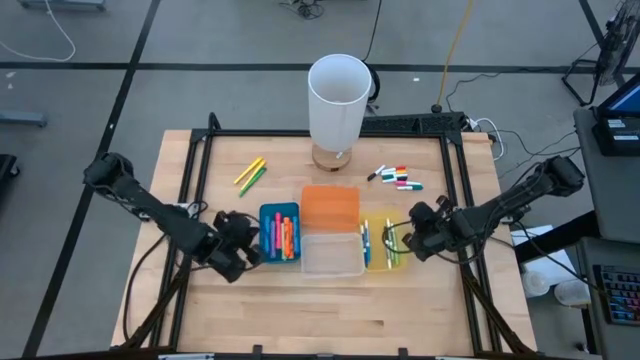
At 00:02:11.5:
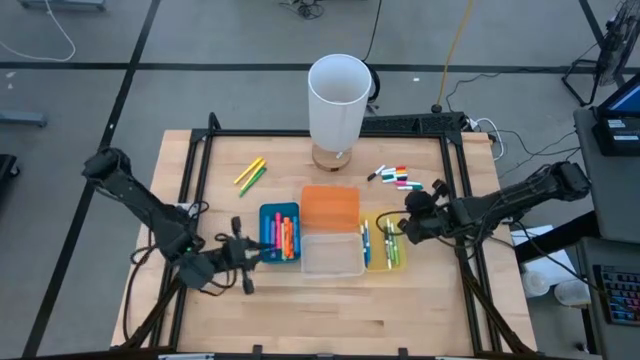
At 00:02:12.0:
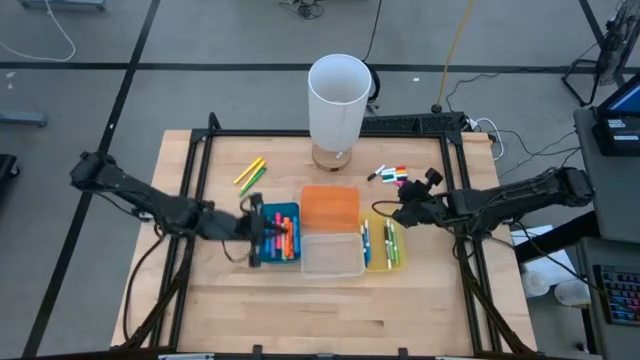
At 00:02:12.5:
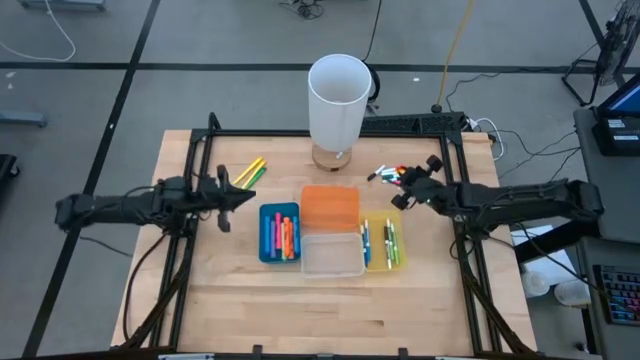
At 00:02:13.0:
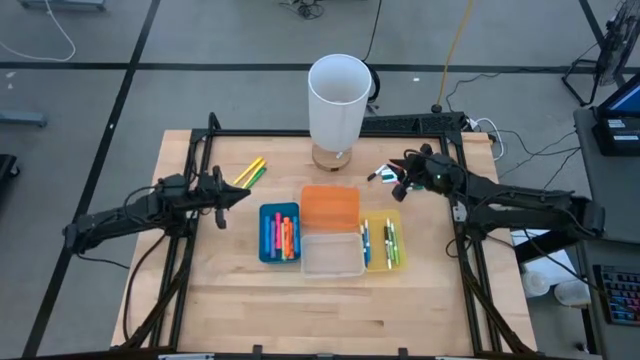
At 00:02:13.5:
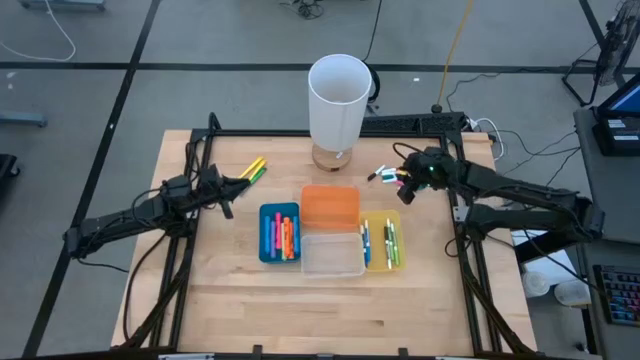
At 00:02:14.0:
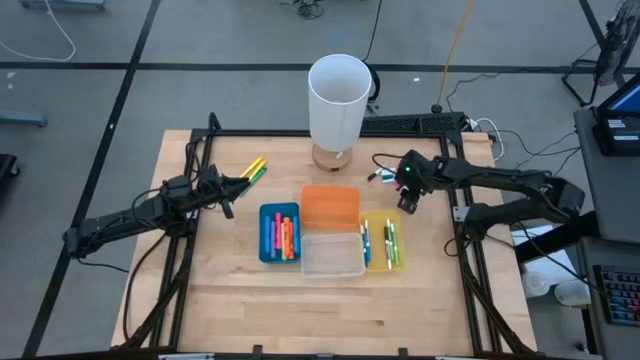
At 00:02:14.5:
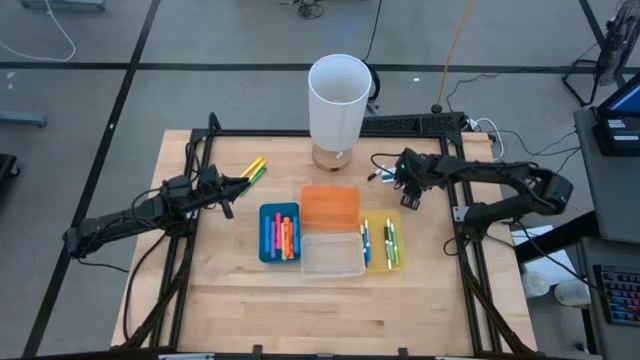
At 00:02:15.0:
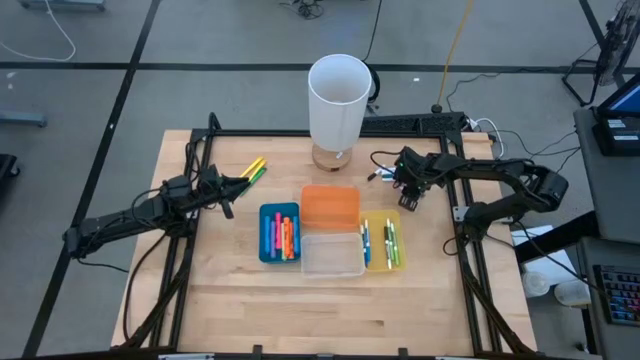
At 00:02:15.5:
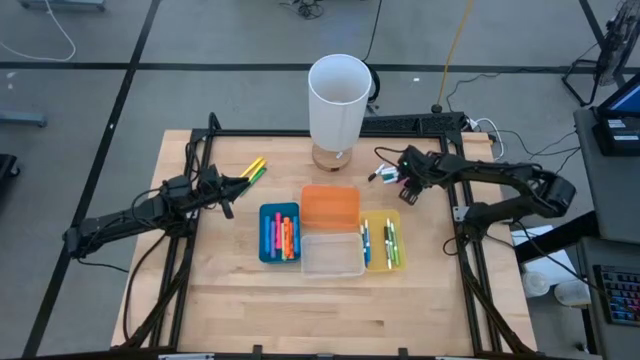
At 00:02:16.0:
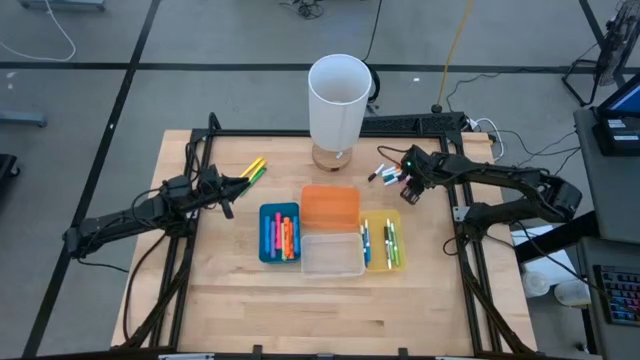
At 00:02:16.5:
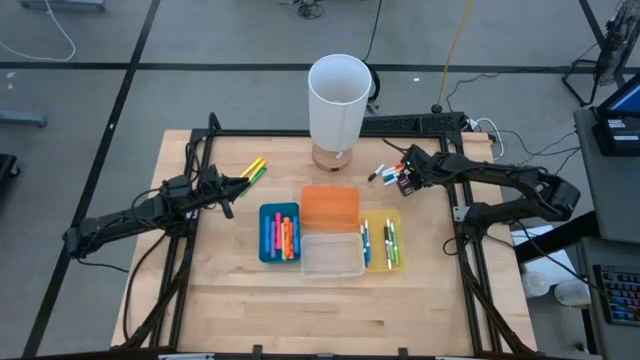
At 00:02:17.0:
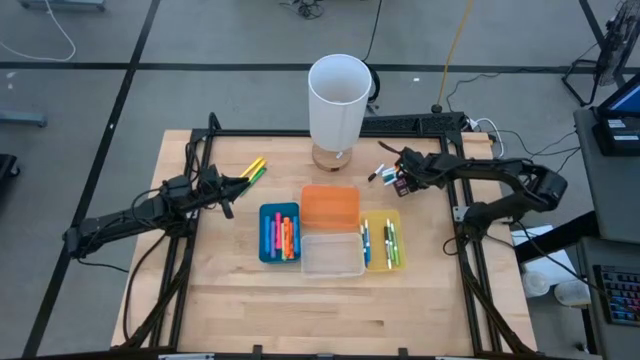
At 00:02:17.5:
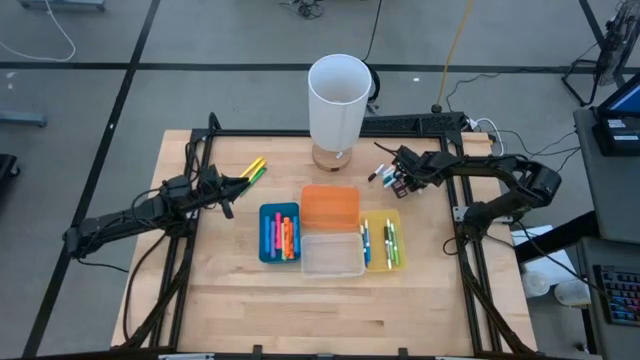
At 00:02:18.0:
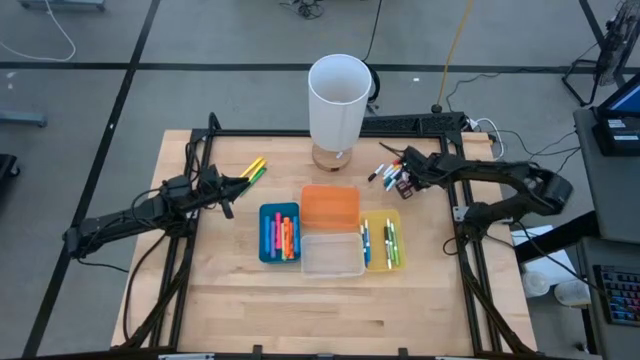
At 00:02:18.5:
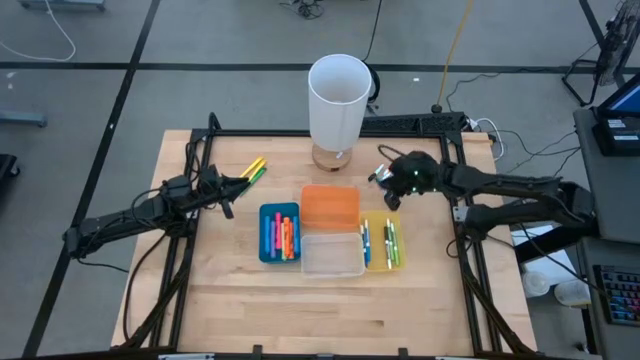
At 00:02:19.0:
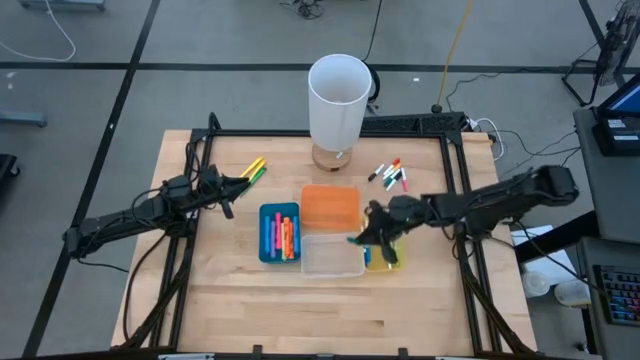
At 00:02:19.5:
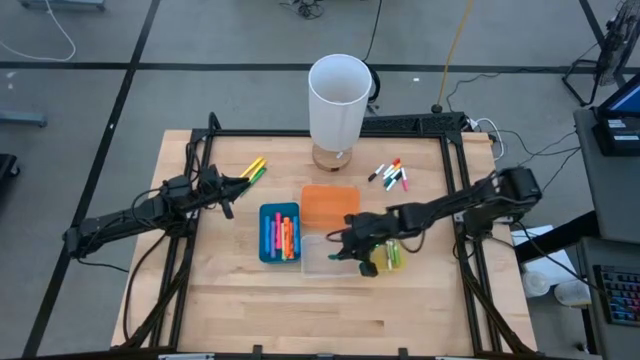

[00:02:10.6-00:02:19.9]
Task: Pick & Place Markers
Put the bottom small green highlighter pen into the transparent bin

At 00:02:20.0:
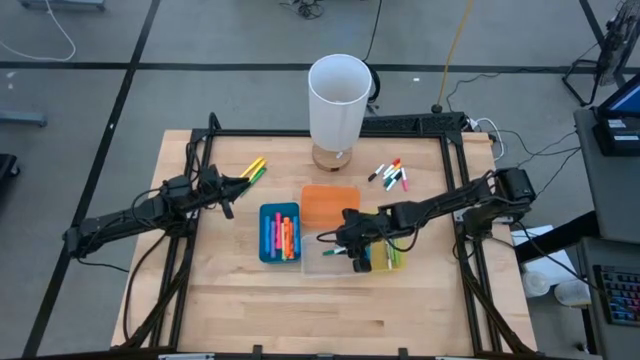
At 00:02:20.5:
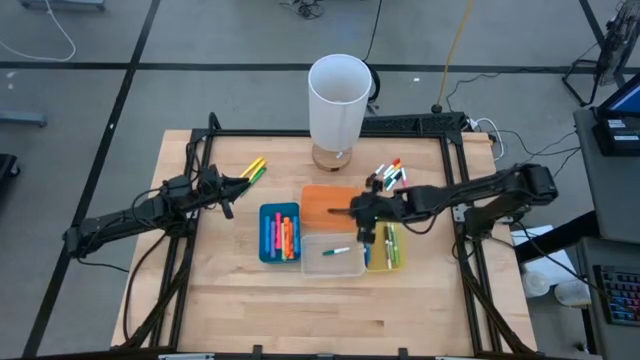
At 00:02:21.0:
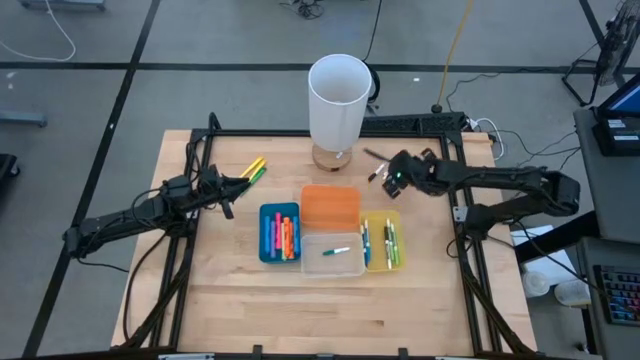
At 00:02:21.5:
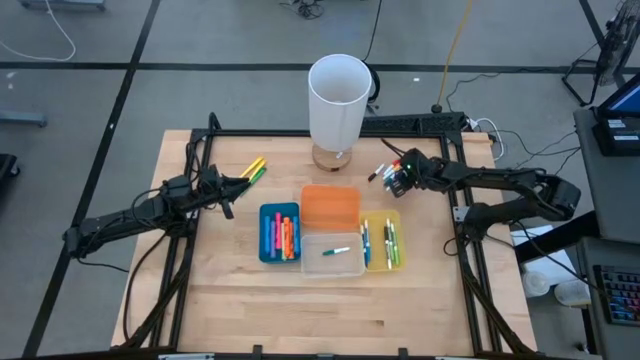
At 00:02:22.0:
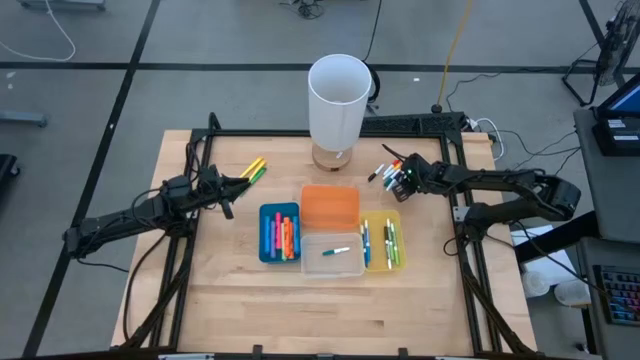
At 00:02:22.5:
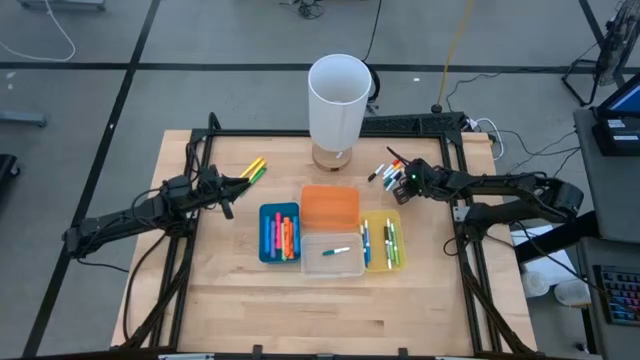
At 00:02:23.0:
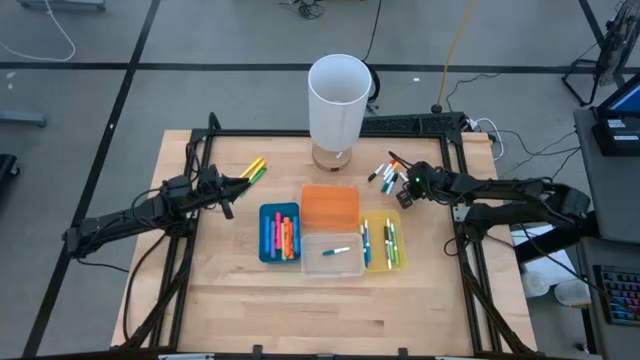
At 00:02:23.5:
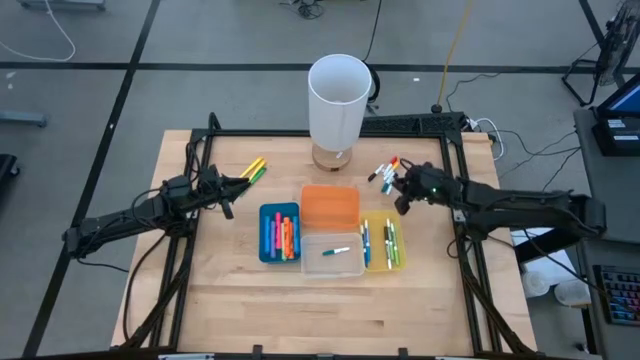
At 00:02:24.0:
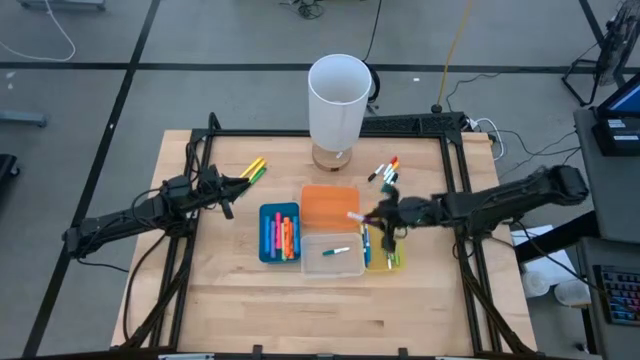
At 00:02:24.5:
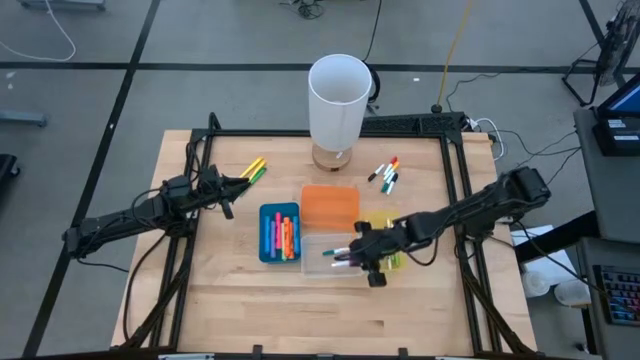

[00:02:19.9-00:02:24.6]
Put the small pink highlighter pen into the transparent bin

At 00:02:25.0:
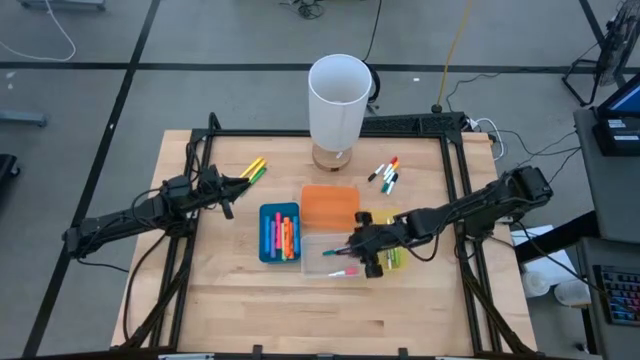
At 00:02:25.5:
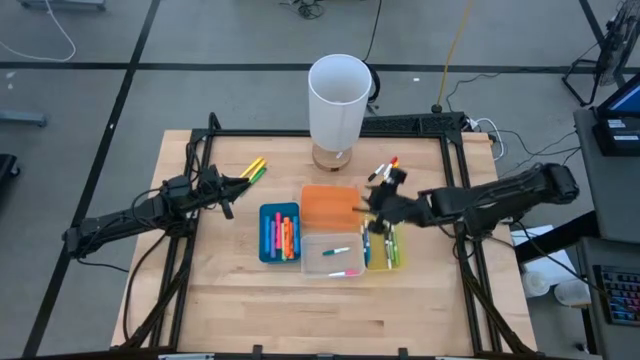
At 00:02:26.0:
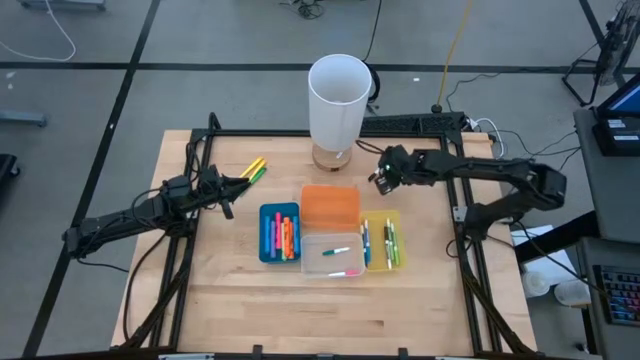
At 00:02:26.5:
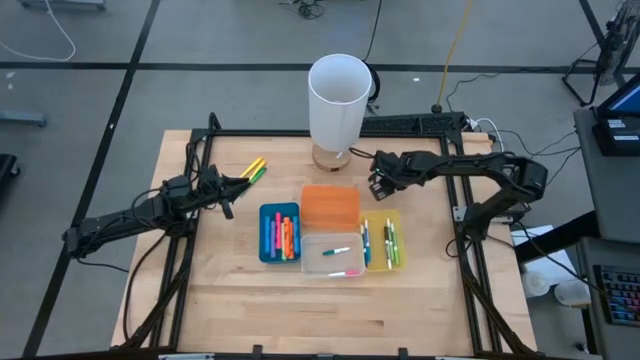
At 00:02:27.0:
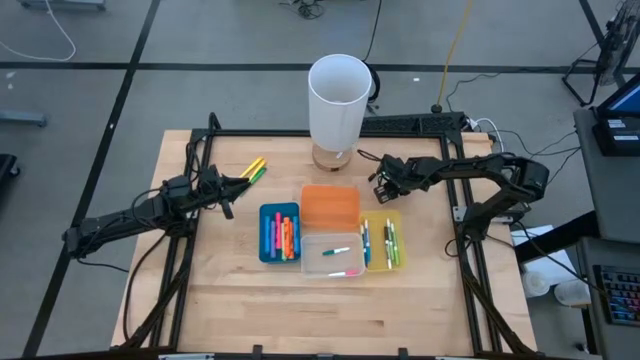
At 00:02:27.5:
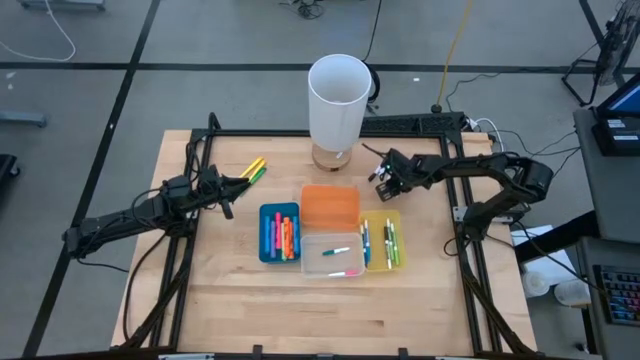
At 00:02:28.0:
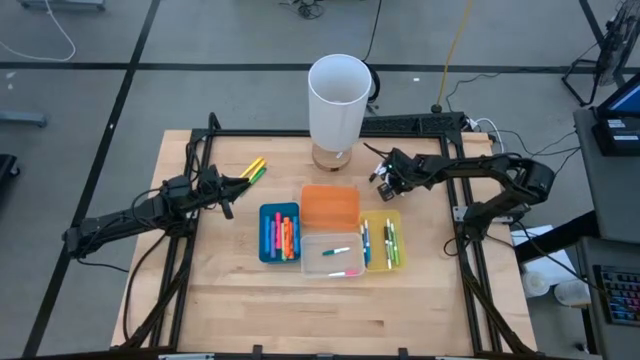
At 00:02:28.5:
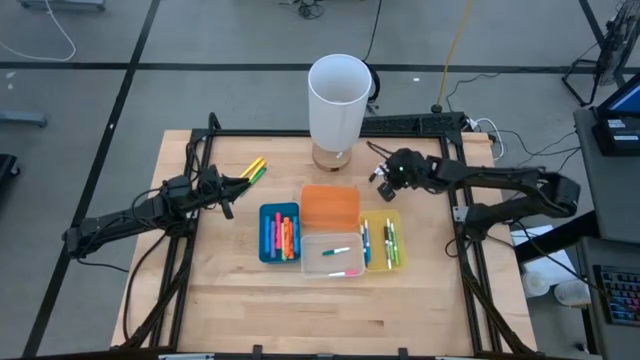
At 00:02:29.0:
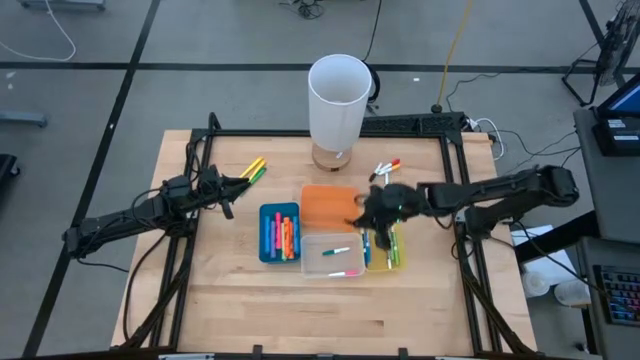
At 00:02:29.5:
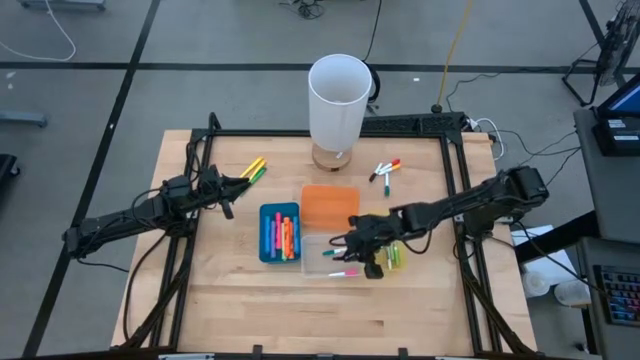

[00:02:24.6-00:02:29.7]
Put the right small black highlighter pen into the transparent bin

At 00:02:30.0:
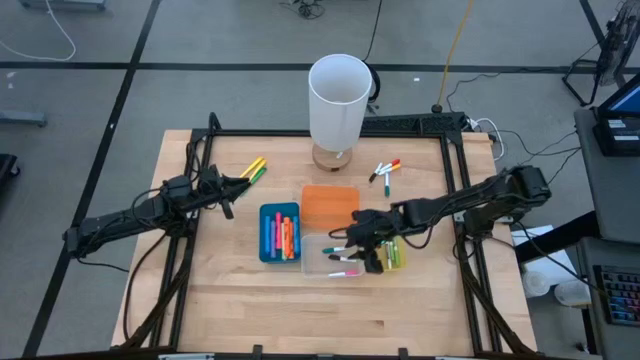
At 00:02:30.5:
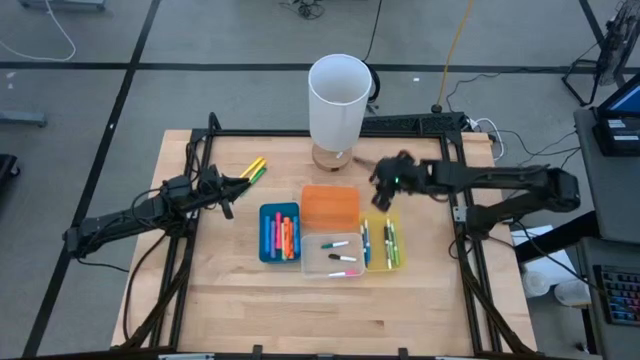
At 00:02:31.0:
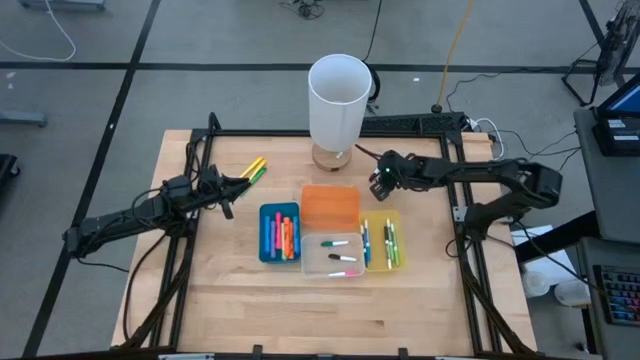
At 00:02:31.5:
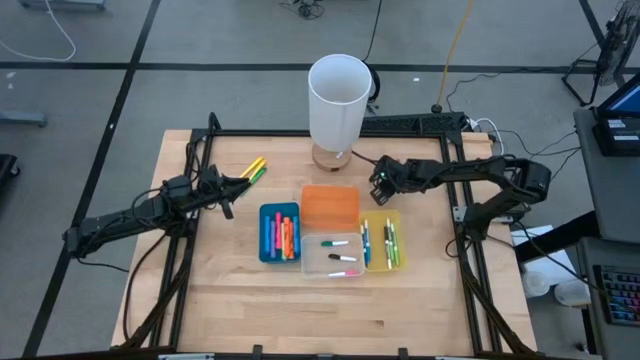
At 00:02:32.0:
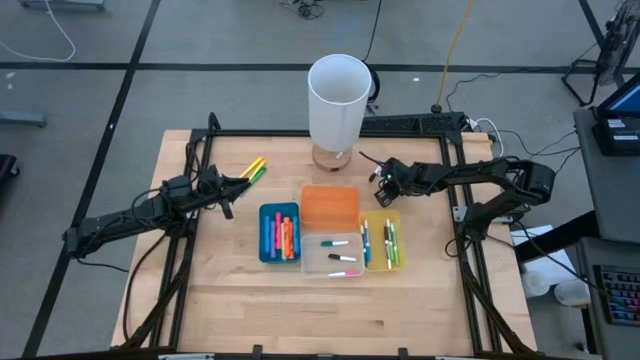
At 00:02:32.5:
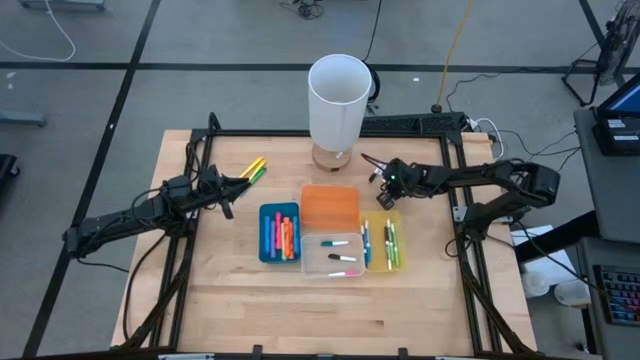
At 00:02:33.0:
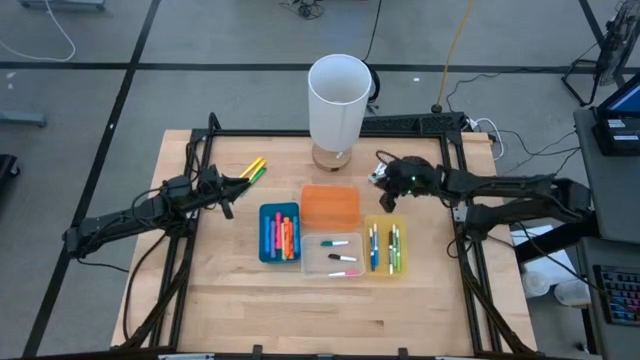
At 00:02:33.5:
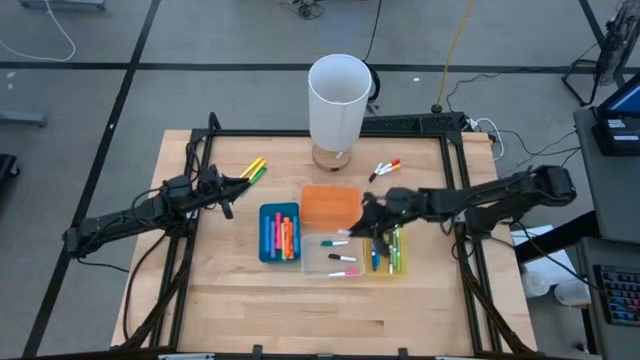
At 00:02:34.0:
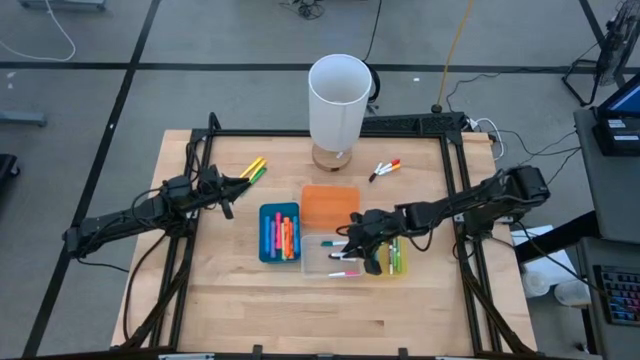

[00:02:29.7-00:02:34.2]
Put the small green highlighter pen into the transparent bin
